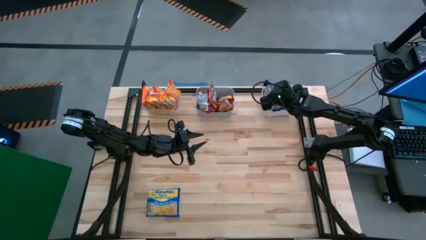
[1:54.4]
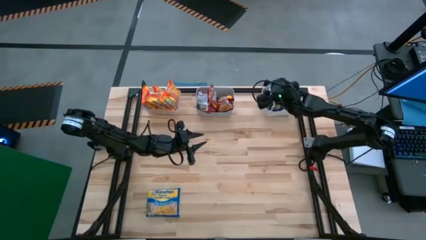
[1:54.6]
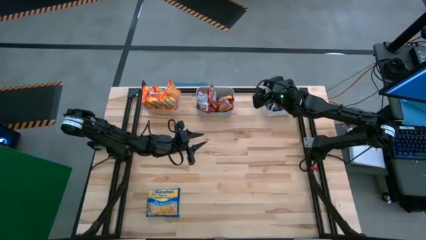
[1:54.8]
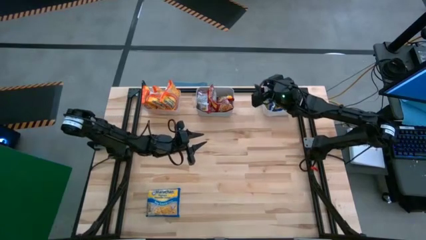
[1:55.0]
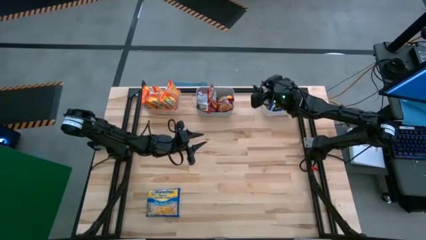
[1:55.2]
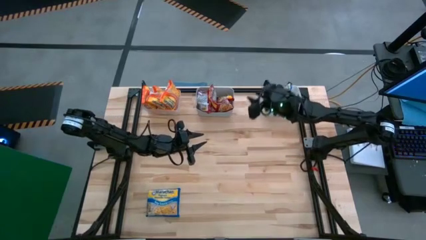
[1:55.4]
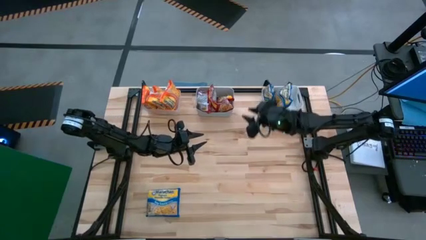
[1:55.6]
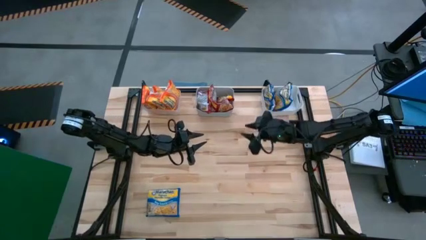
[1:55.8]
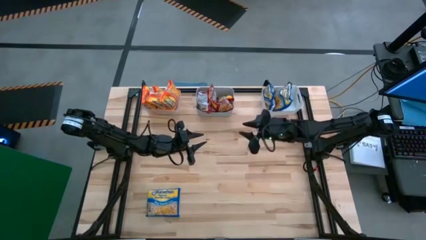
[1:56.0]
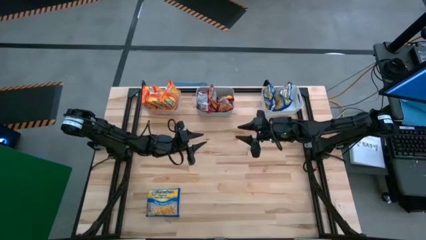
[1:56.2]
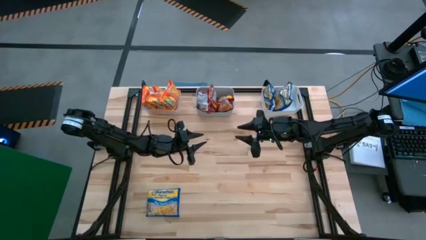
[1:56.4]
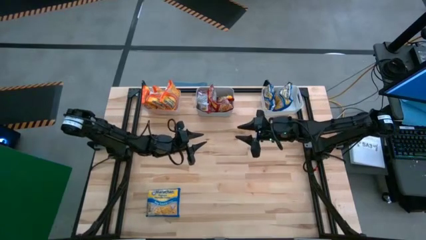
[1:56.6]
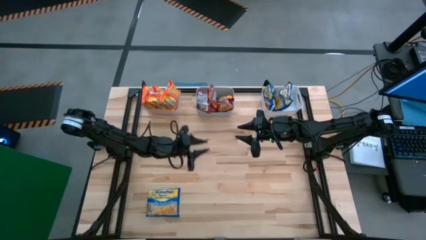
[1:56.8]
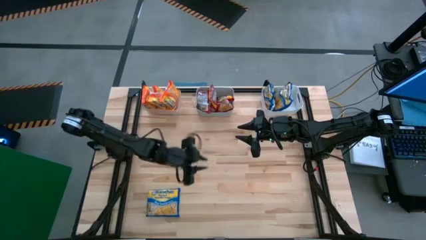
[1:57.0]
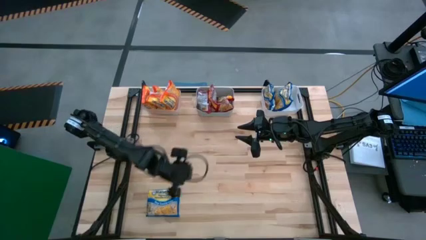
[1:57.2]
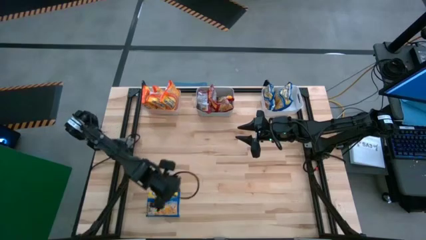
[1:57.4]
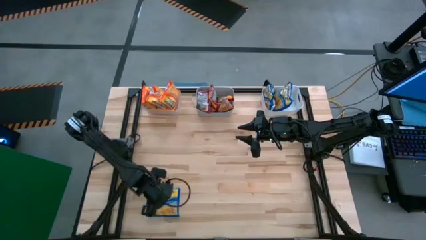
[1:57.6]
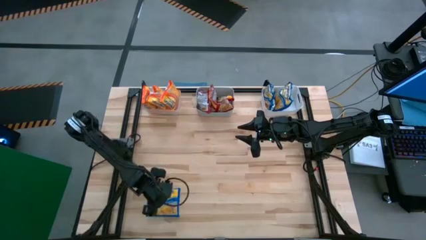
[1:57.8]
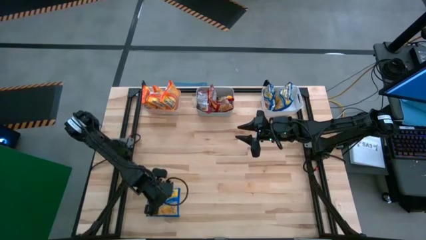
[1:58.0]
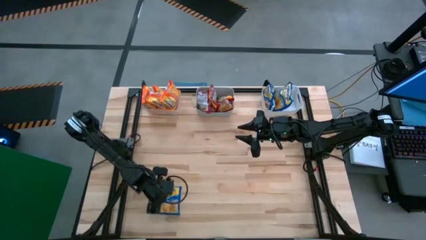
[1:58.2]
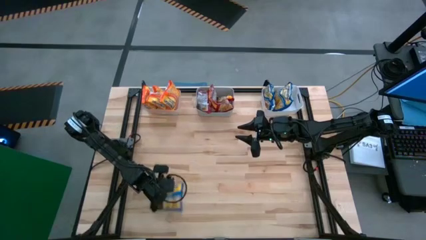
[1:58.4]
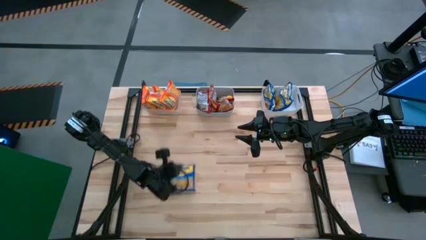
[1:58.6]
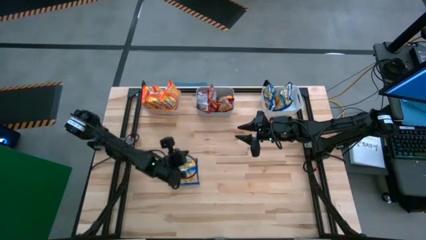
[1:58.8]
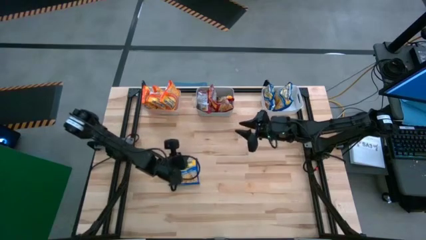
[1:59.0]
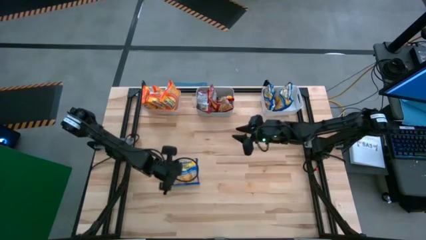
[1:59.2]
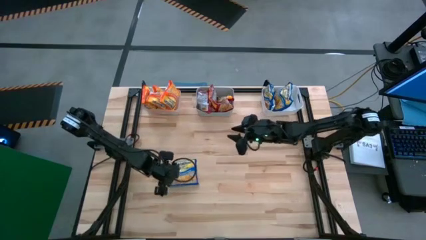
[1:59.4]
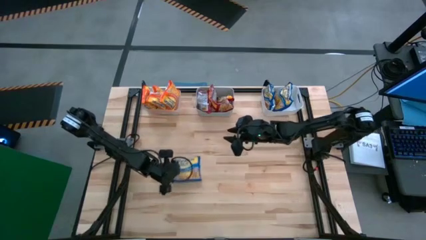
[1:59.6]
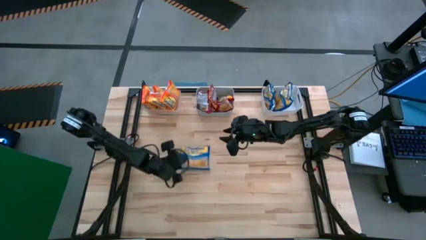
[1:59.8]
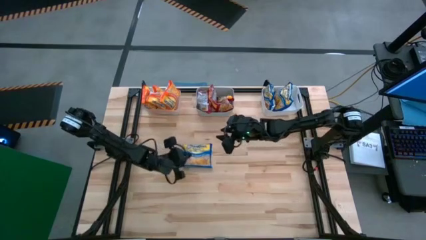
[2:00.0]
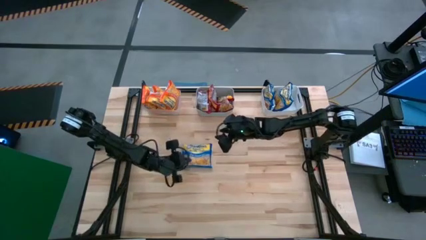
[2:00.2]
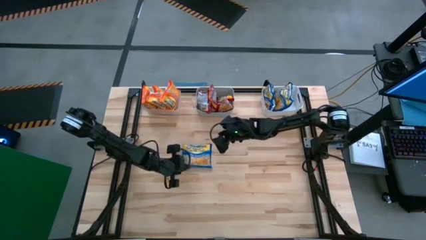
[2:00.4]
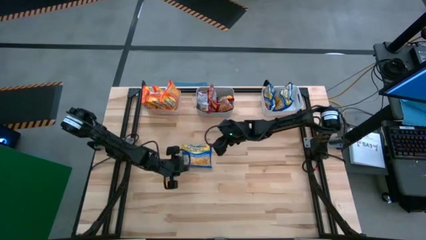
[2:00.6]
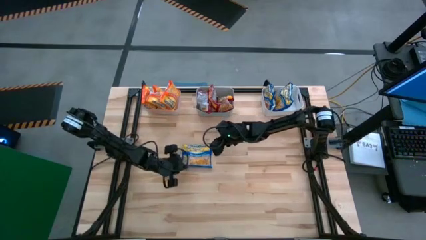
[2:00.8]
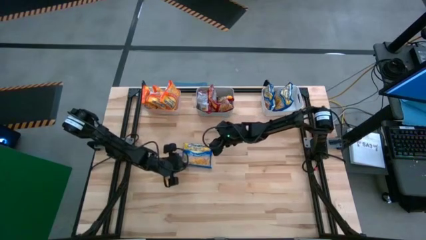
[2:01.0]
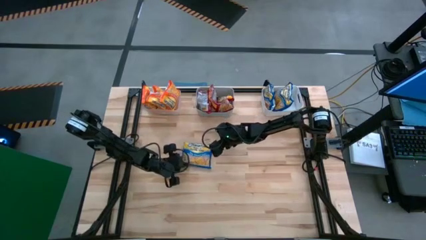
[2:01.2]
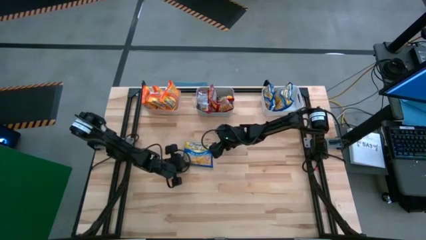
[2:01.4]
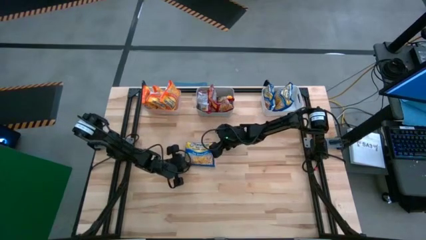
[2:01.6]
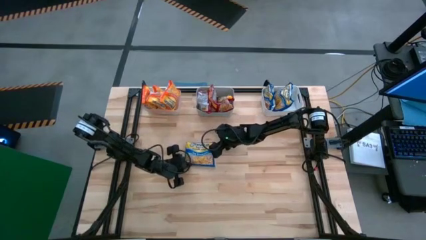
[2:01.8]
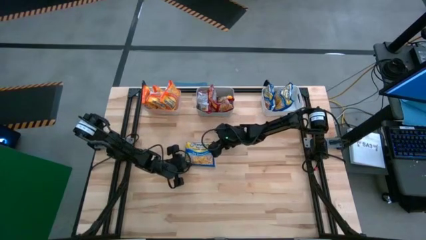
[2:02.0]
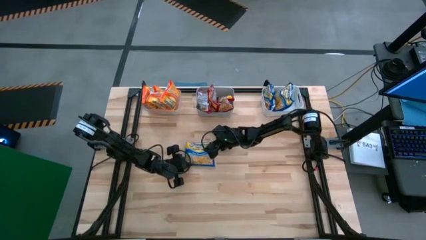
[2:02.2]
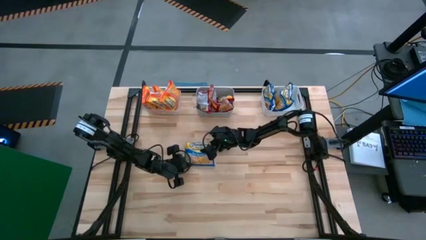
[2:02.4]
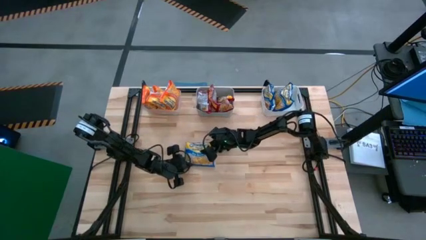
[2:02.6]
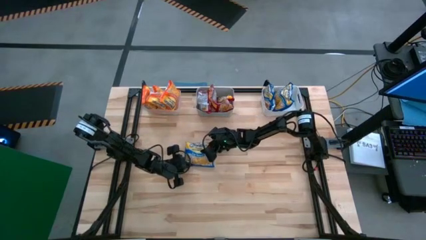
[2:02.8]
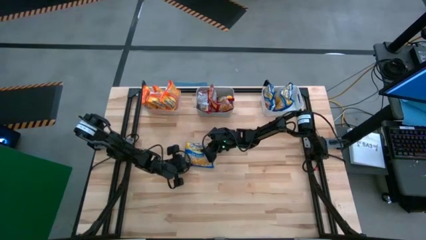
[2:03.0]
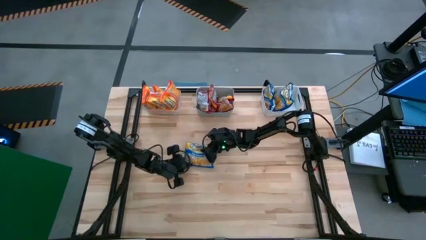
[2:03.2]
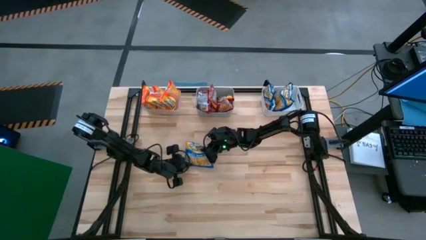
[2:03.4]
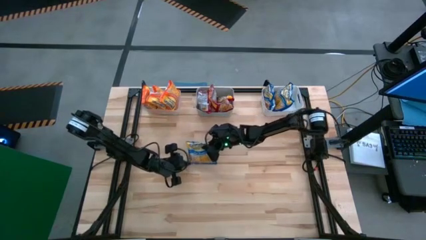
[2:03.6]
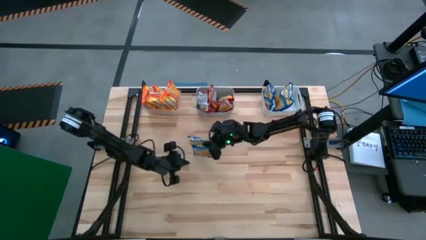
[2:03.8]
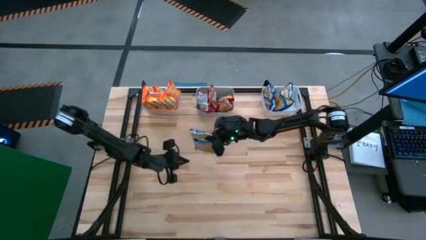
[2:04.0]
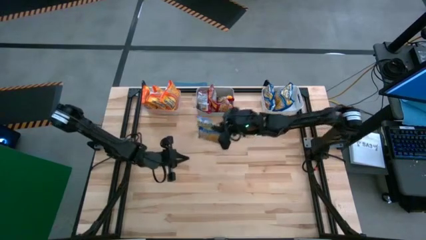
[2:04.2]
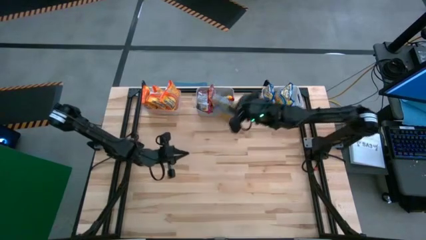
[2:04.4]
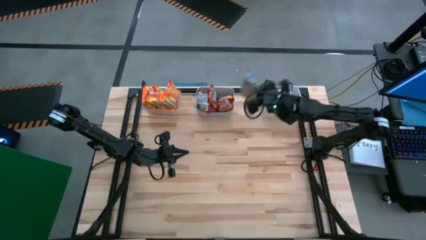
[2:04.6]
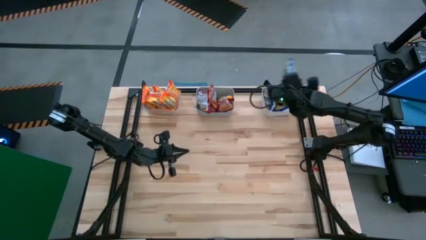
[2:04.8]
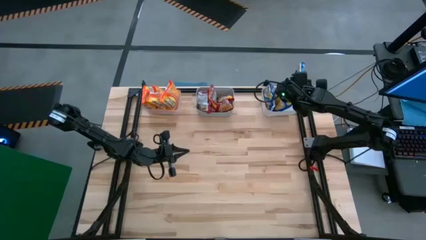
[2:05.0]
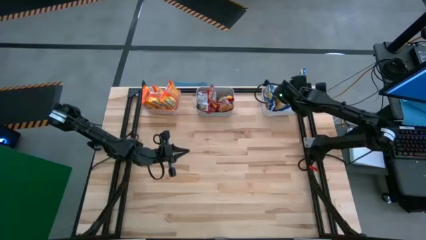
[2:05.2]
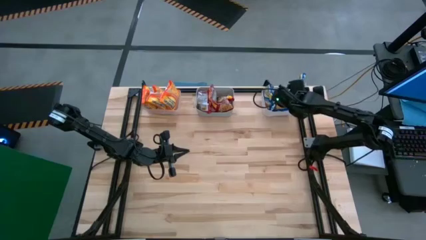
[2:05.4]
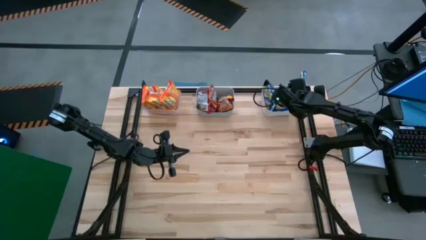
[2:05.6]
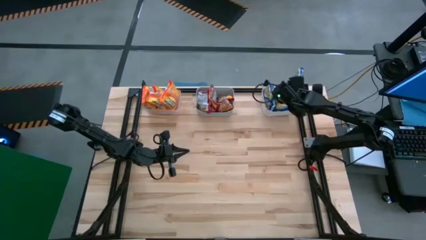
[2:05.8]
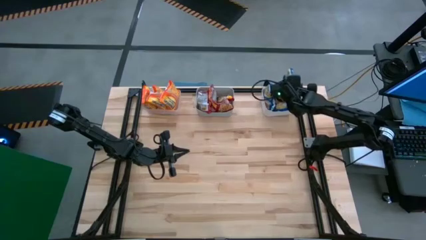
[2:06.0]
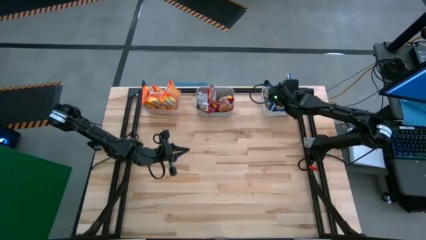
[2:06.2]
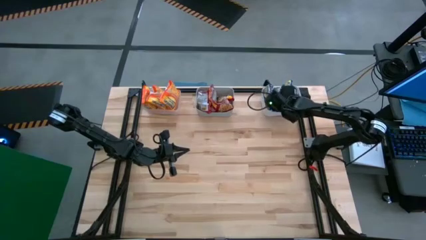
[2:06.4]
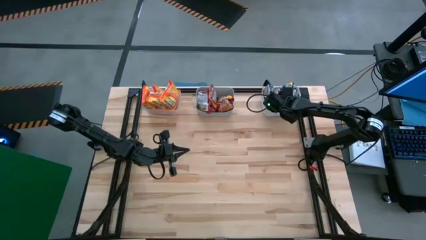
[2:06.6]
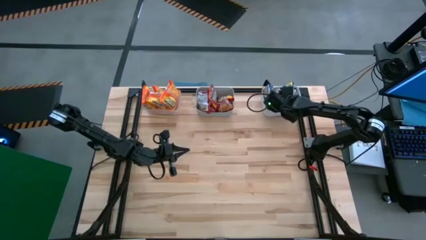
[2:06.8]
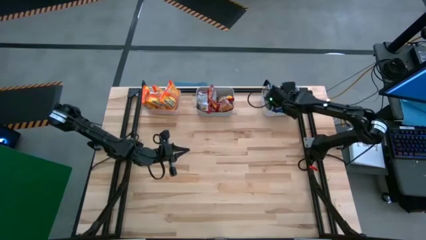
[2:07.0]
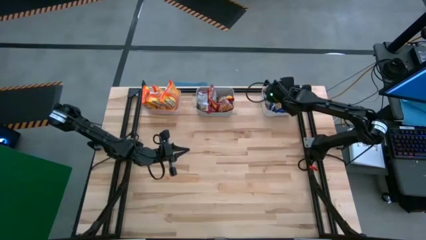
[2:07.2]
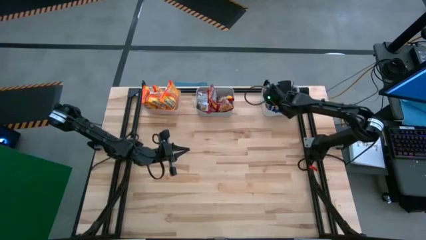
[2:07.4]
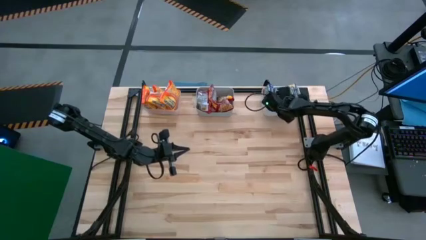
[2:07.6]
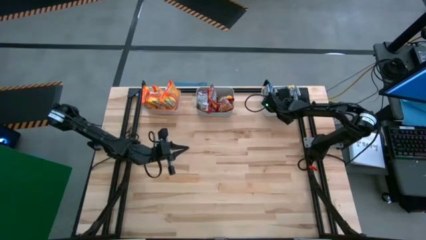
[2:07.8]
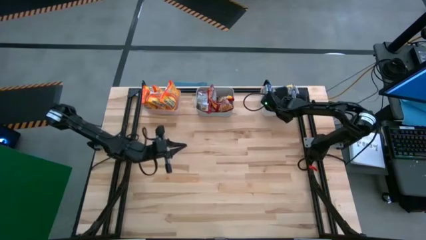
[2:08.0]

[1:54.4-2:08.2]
Task: Sort Maruchan noodles
Put the blue noodle pack into the white bin

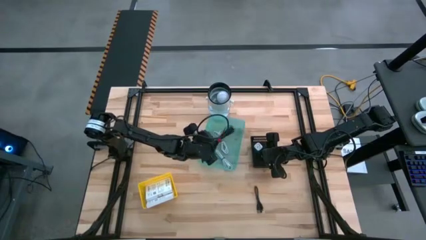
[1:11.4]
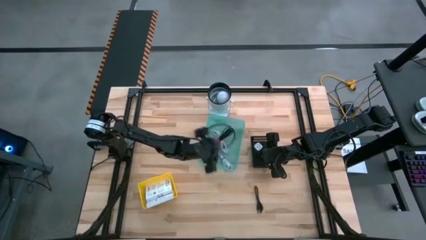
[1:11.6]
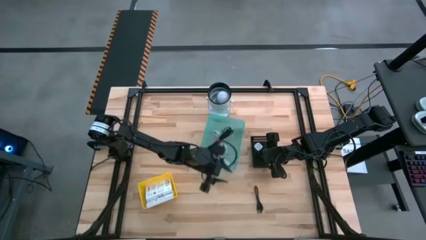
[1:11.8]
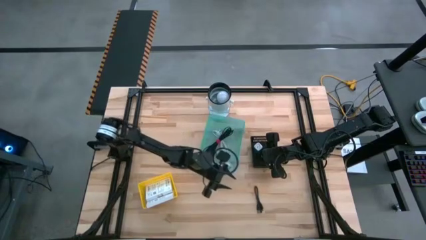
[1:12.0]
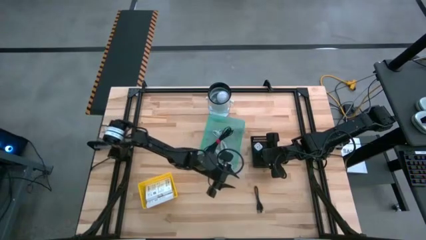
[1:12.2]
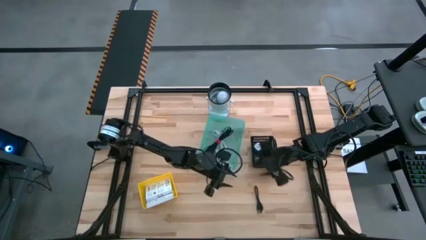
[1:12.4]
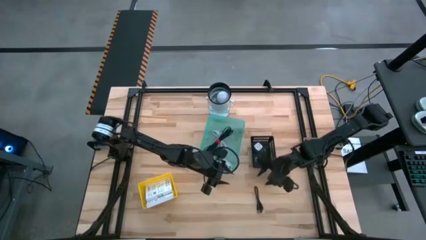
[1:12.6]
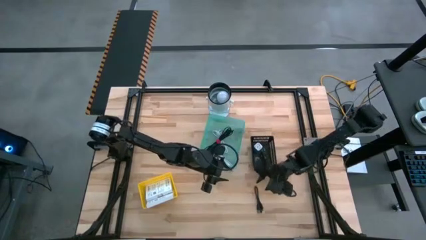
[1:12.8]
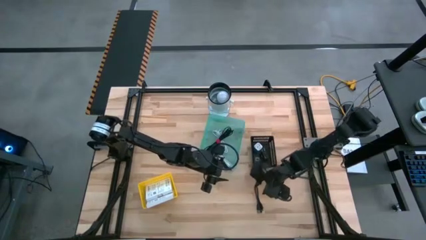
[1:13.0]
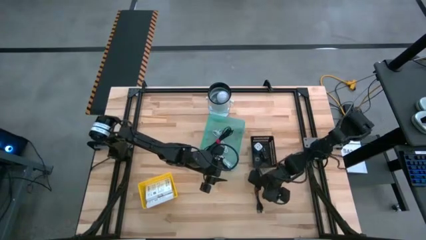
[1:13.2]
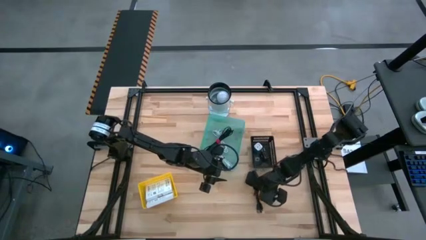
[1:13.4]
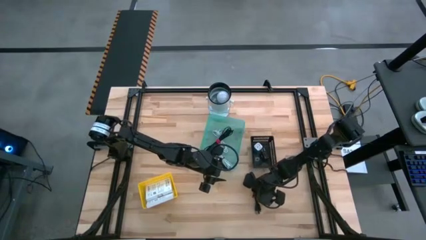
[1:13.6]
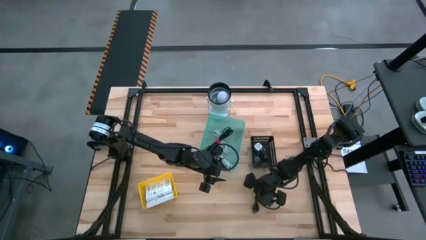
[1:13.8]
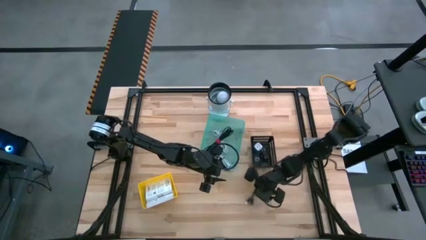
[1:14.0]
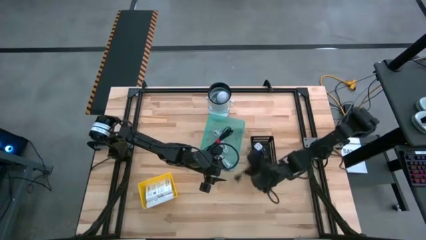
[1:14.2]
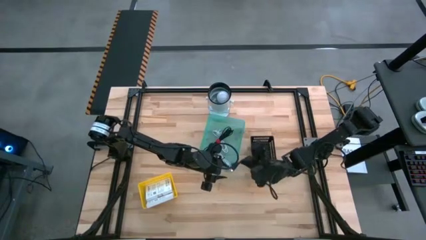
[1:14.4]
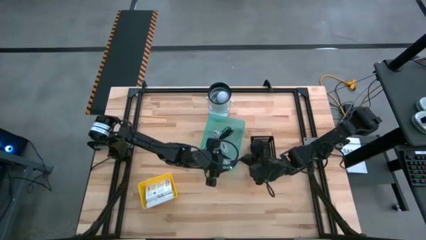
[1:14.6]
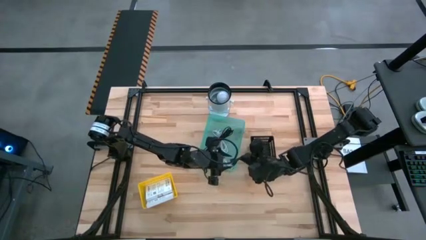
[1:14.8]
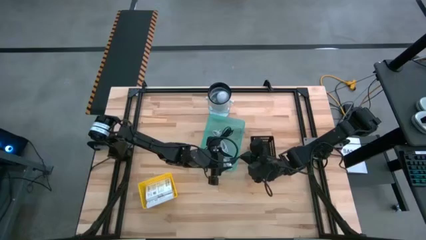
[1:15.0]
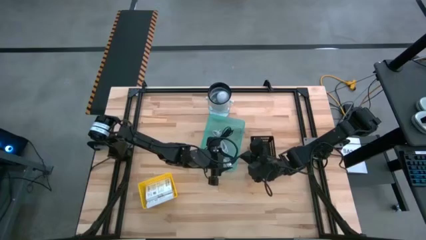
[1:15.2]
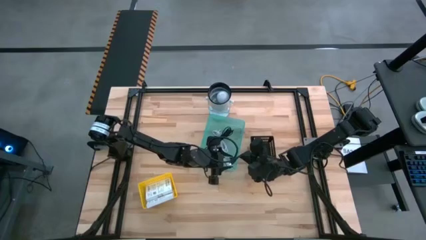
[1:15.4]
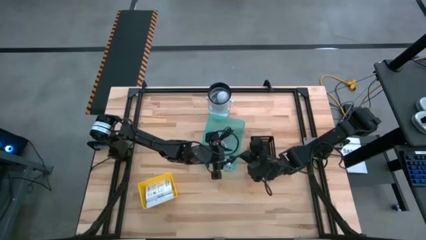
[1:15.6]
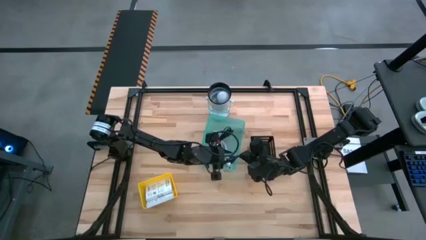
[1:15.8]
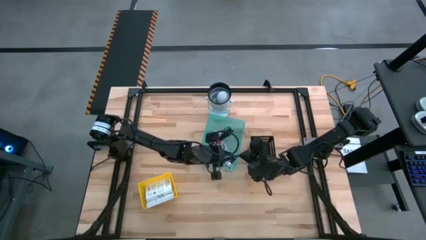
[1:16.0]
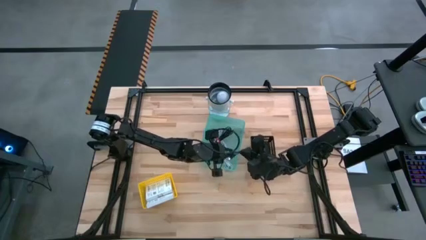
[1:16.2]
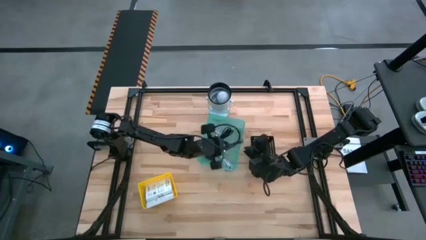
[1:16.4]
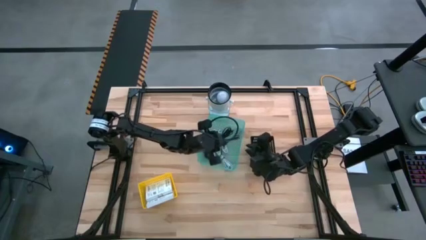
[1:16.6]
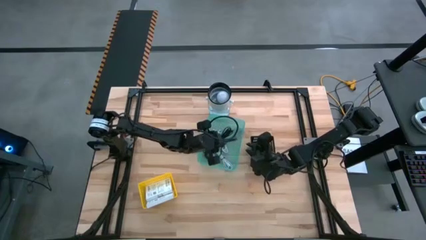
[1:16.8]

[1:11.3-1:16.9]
Task: Pick and place items into bin
Put the black charger cable into the green bin
